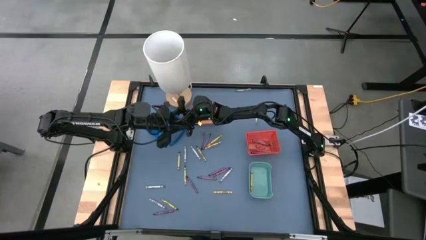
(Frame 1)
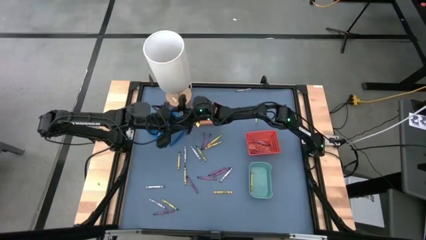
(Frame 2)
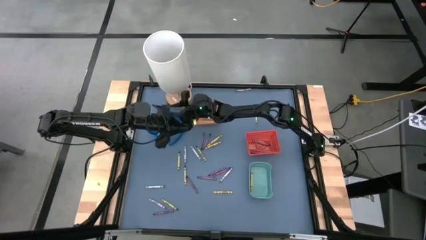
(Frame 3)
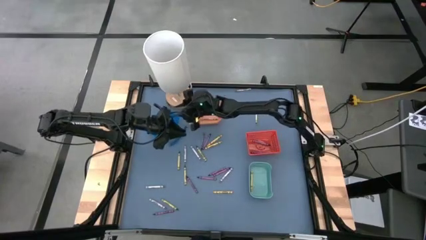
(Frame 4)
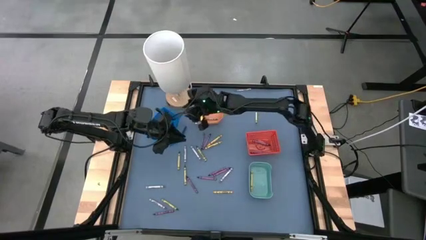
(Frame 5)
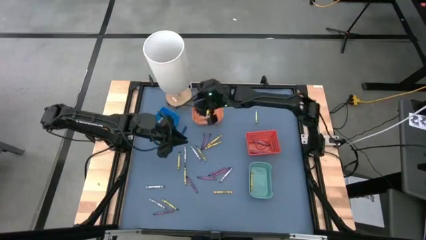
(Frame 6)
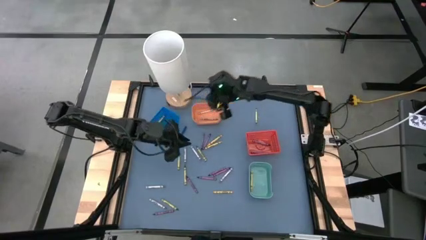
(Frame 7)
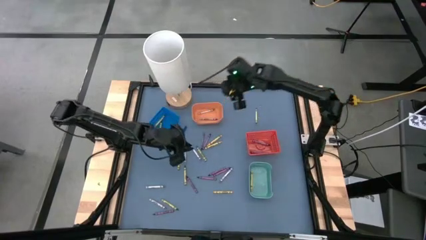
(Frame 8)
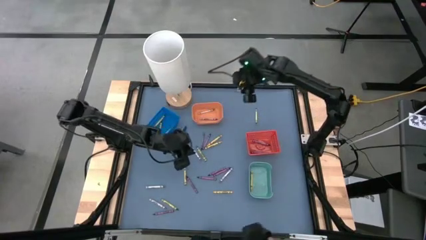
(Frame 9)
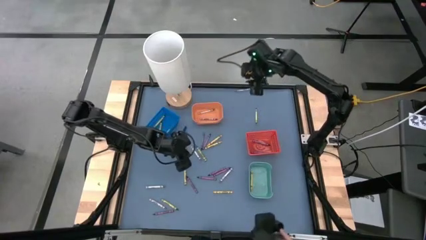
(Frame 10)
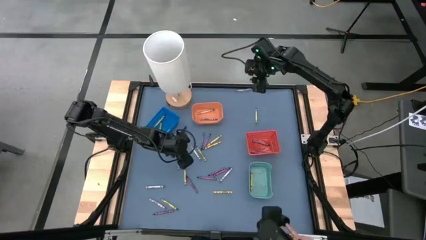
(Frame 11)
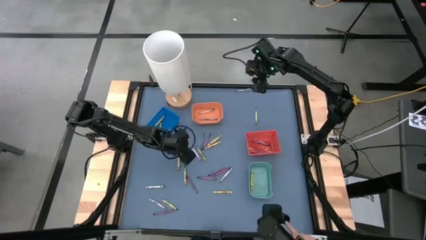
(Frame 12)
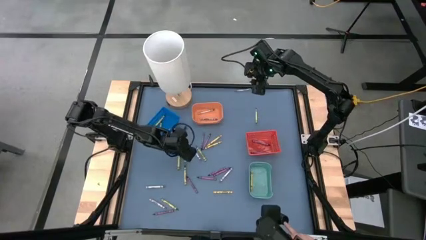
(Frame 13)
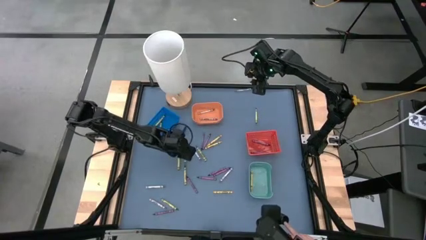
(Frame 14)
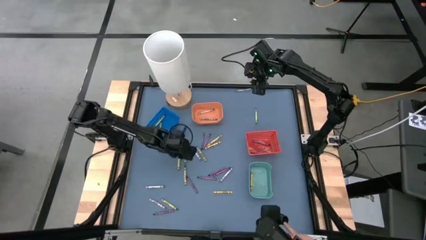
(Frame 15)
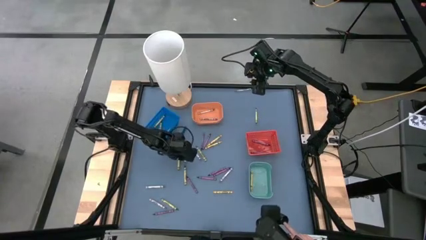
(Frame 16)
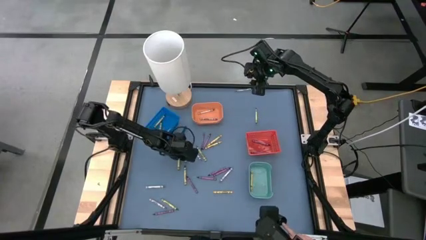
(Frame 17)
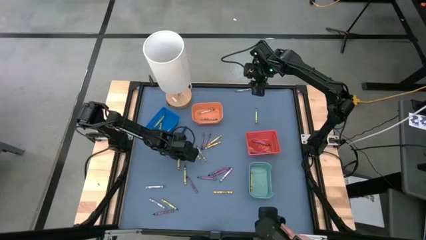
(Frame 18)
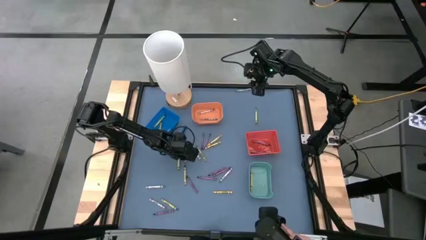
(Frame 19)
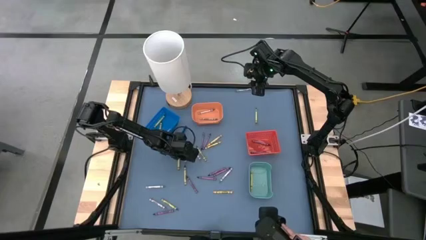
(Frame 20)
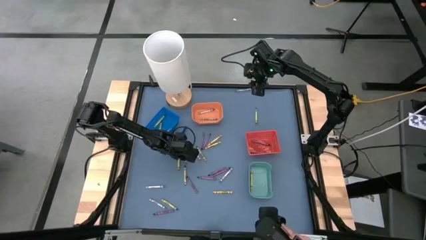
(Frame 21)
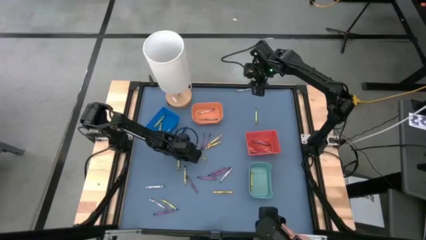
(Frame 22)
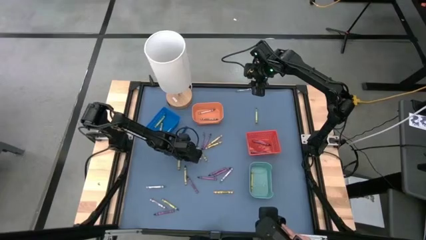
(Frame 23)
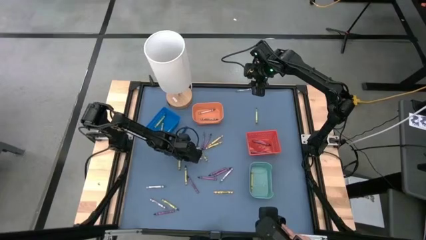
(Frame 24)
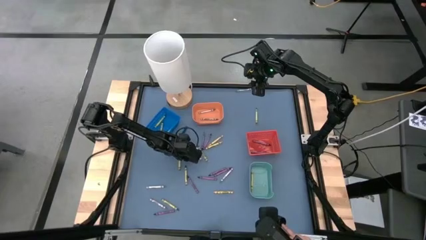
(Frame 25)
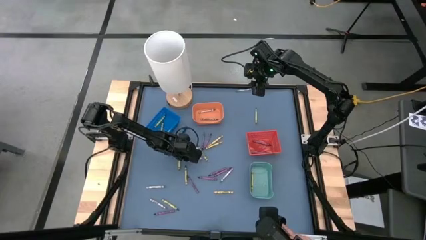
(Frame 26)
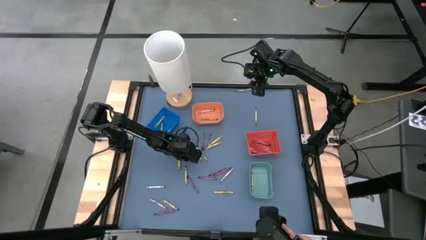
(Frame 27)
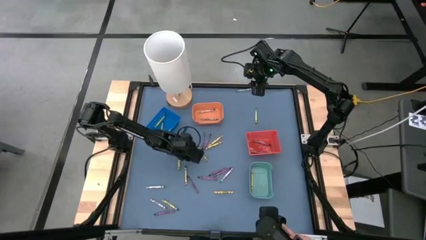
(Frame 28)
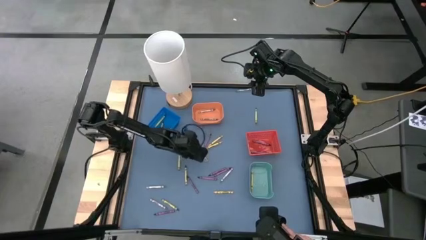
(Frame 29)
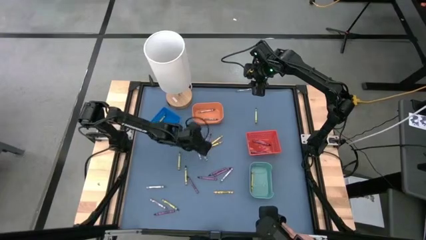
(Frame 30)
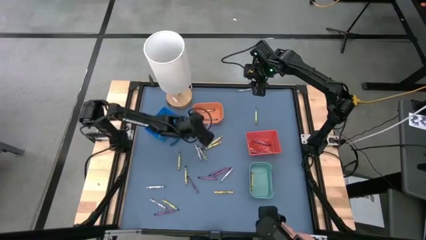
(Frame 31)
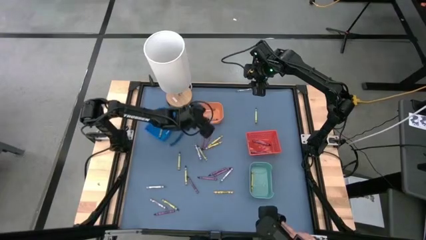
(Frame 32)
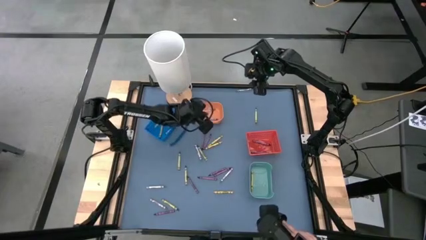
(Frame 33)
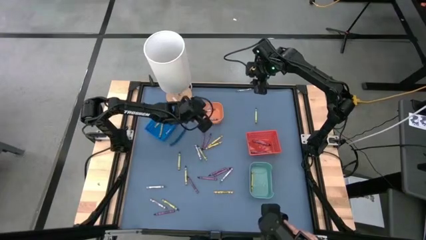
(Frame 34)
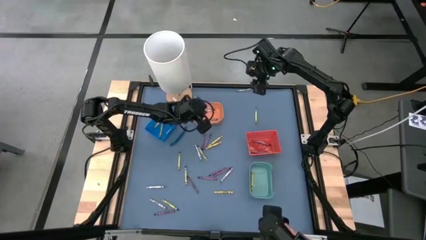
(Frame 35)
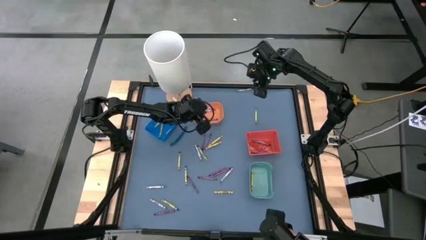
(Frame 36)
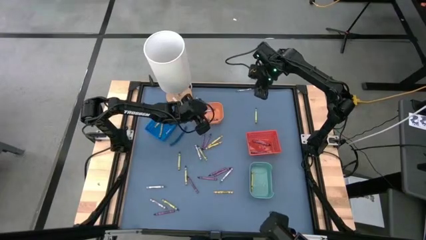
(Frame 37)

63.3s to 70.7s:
Task: Sort crayons
Put the gray crayon into the orange bin

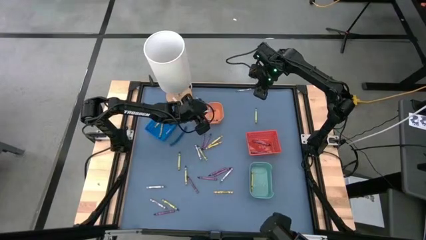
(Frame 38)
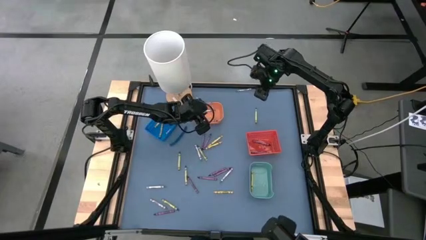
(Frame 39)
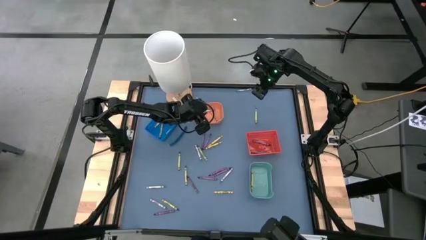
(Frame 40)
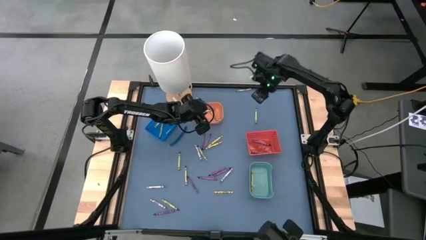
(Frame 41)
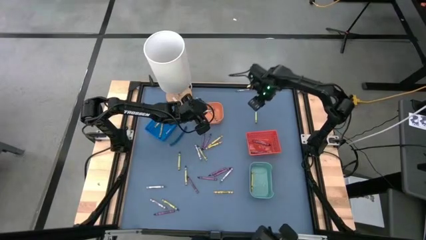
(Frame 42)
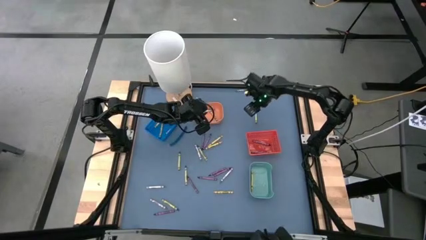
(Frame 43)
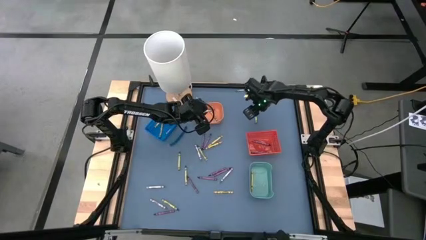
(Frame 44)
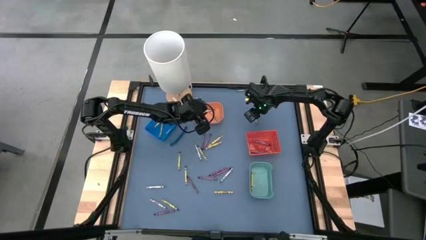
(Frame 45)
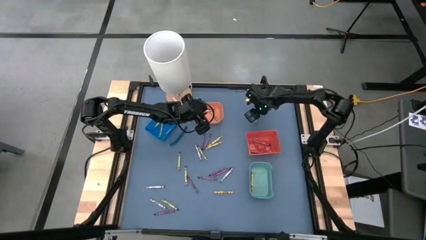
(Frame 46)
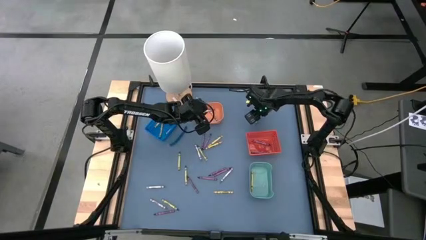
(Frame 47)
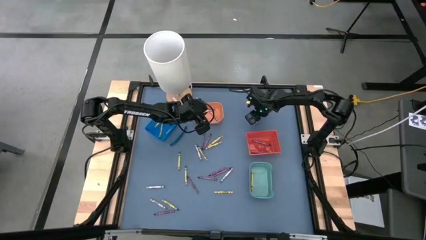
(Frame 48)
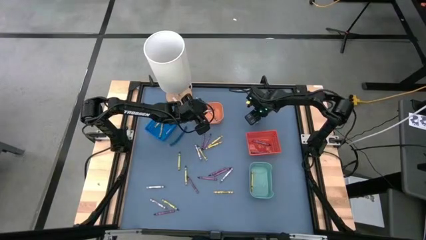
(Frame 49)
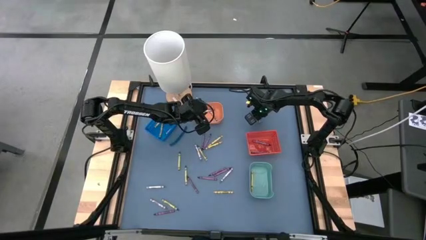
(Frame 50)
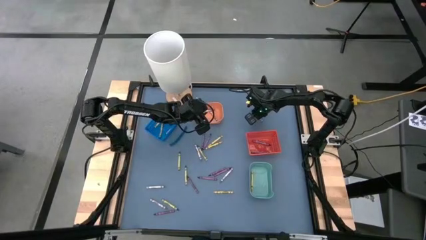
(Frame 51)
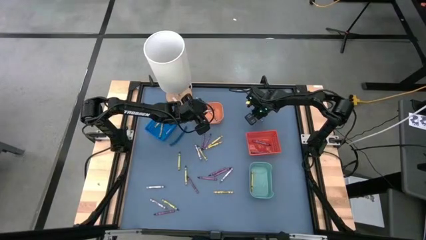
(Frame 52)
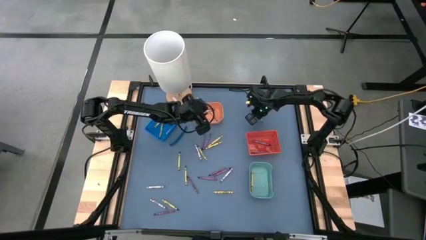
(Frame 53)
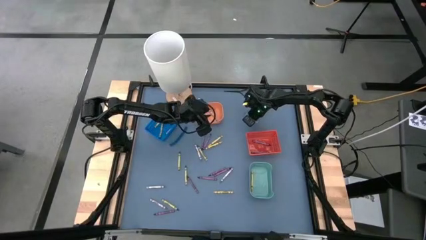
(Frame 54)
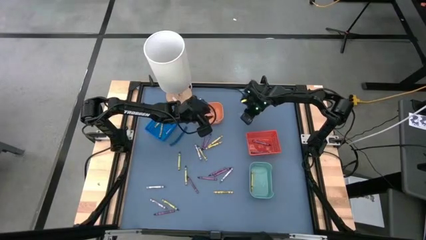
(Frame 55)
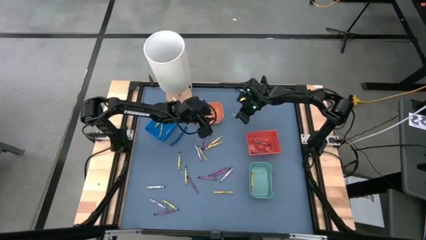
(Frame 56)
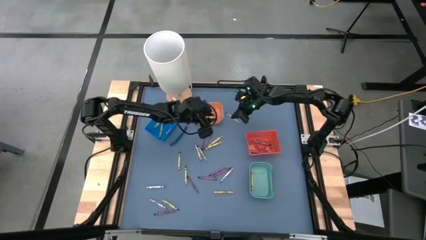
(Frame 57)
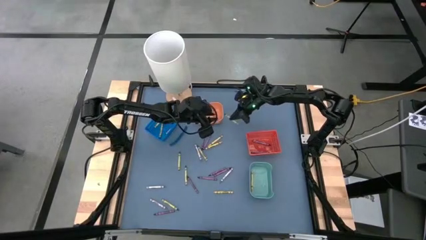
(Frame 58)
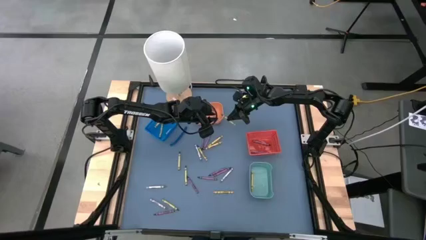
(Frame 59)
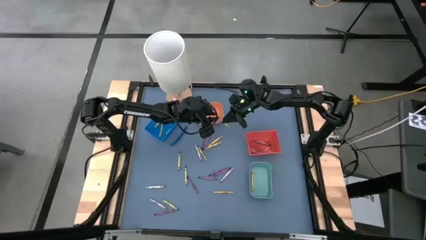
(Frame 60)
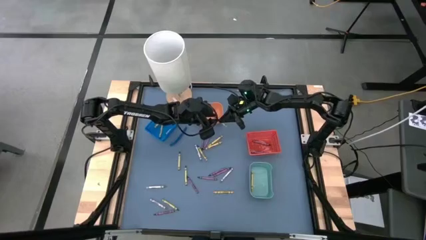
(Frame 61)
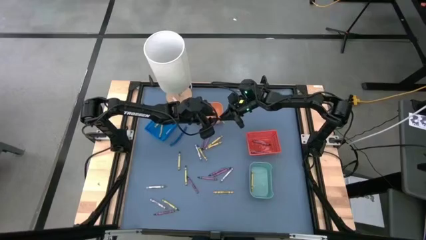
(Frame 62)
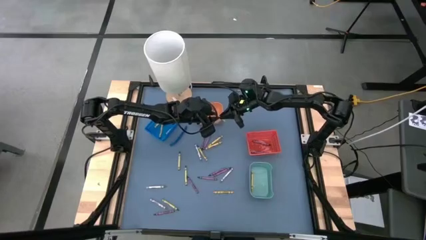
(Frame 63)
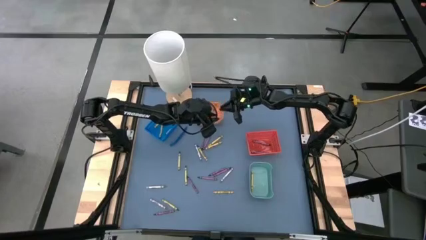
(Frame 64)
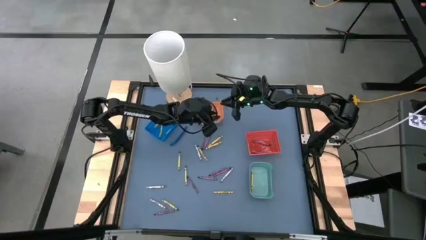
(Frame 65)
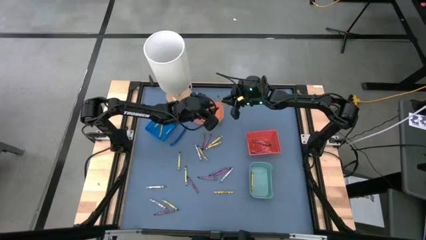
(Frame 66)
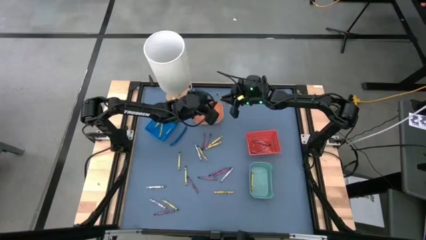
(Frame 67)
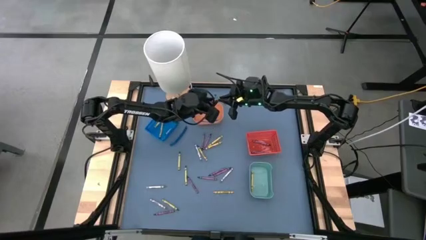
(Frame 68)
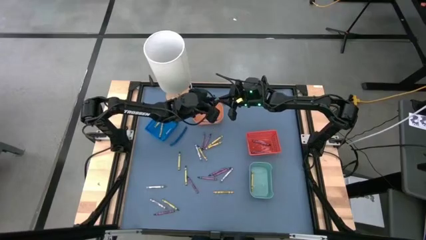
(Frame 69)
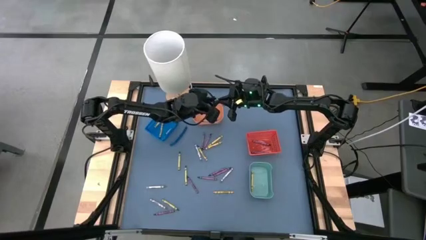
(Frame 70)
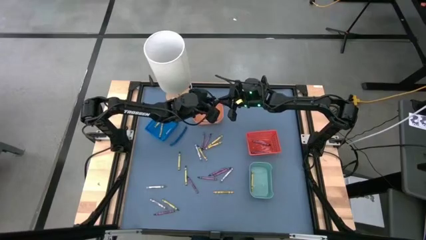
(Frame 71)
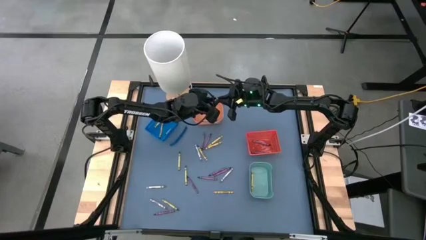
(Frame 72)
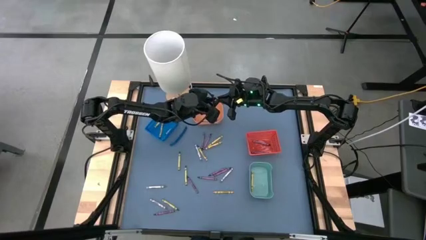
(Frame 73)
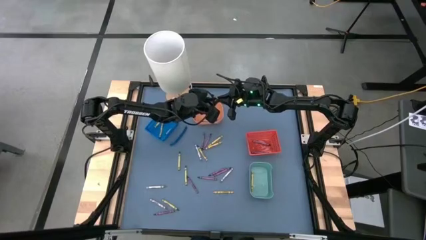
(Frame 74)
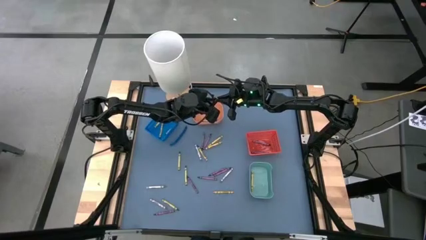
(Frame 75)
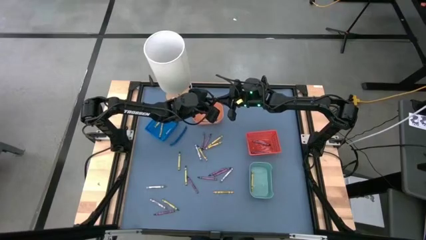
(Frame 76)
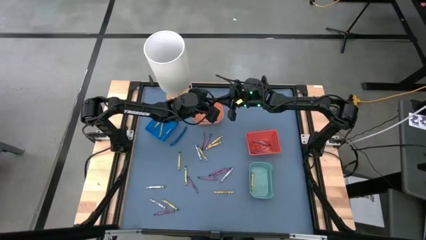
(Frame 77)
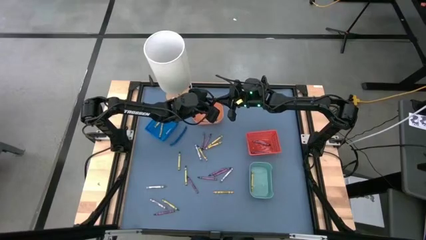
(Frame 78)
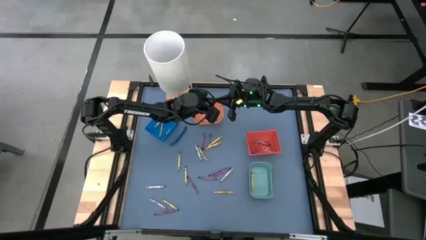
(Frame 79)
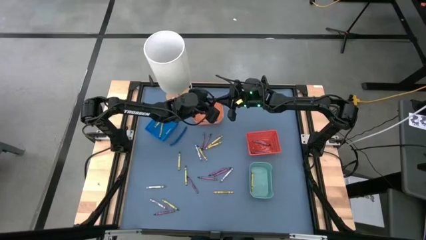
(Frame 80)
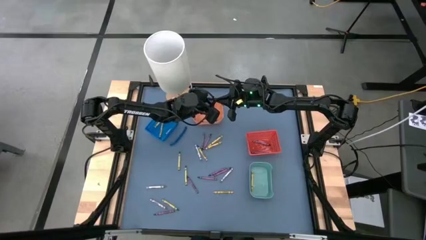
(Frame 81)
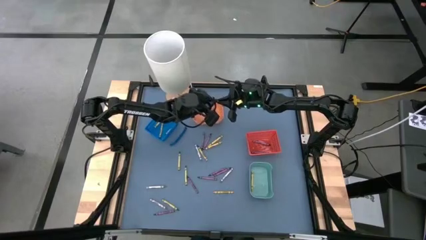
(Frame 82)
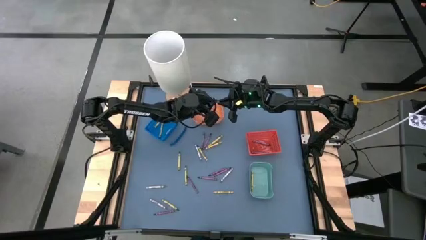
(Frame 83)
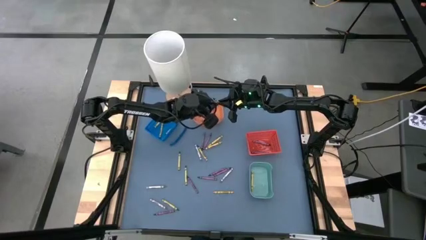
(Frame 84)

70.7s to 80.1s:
Put the green crayon into the dark blue bin
